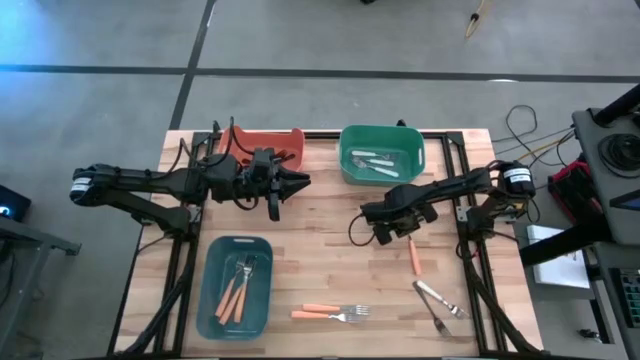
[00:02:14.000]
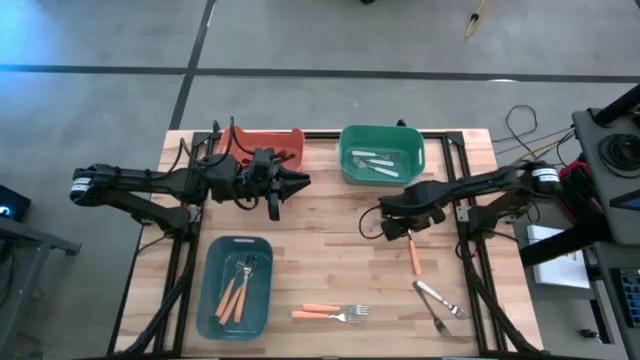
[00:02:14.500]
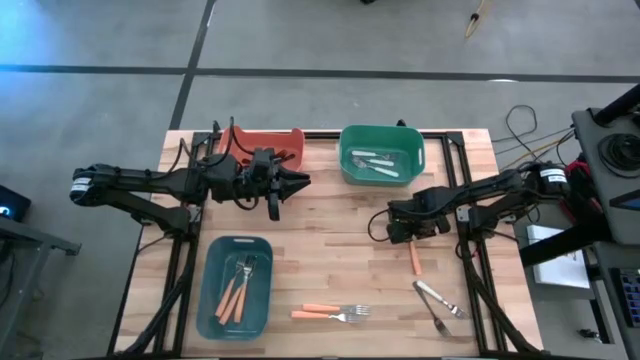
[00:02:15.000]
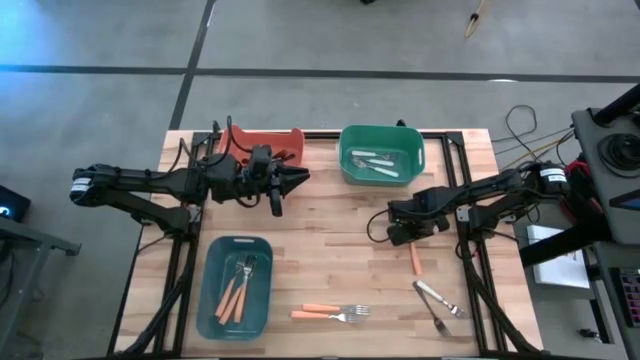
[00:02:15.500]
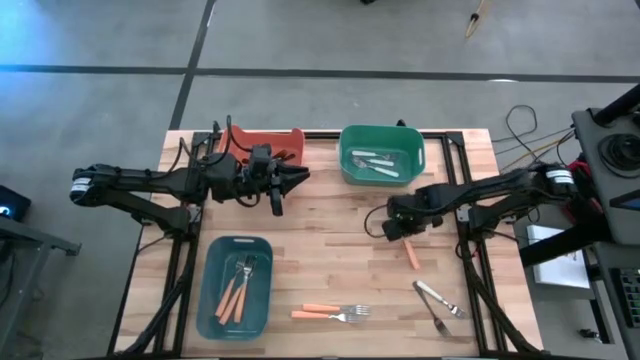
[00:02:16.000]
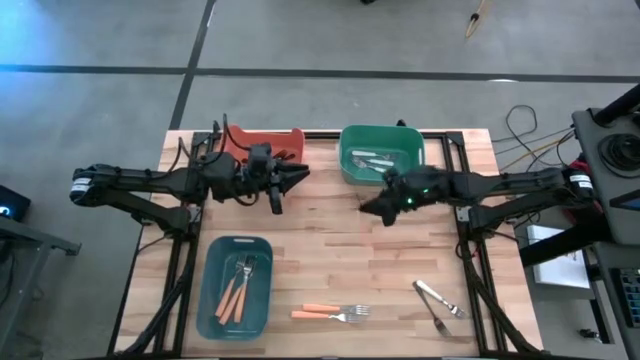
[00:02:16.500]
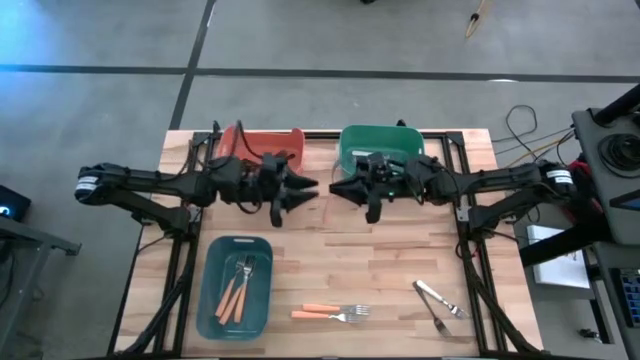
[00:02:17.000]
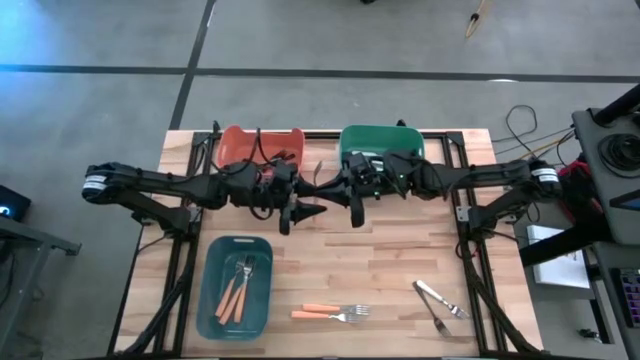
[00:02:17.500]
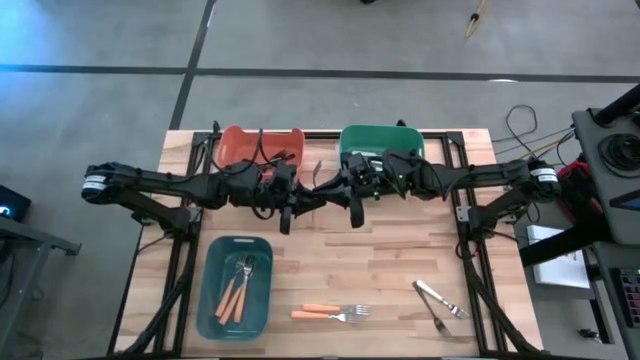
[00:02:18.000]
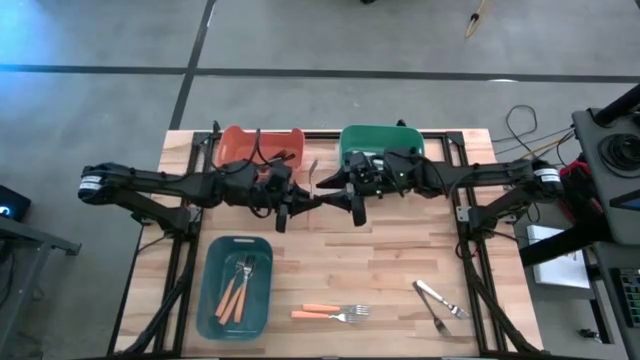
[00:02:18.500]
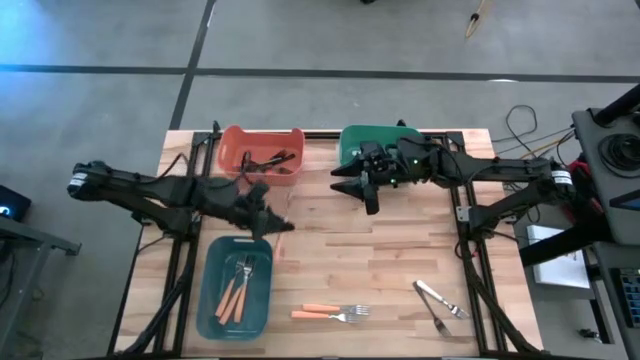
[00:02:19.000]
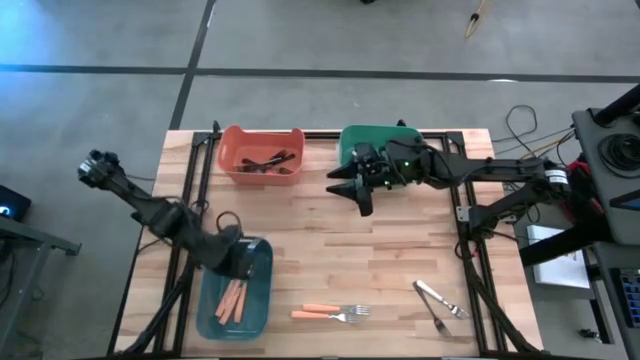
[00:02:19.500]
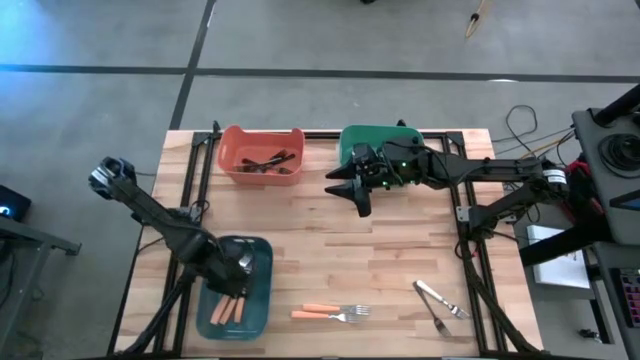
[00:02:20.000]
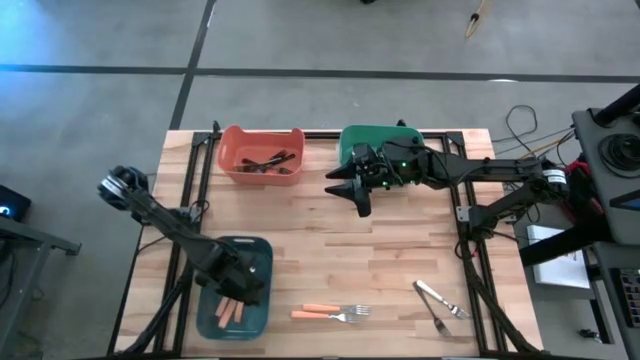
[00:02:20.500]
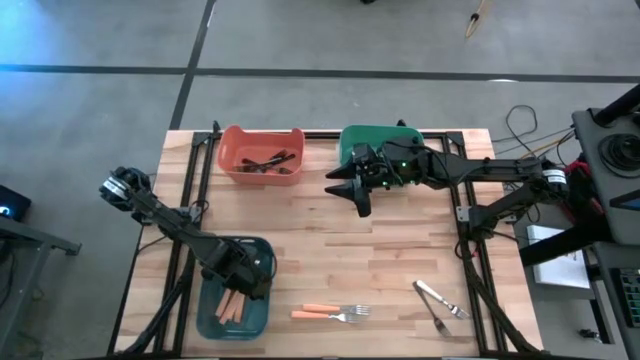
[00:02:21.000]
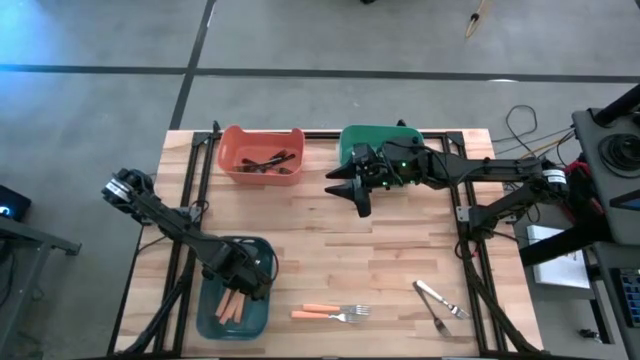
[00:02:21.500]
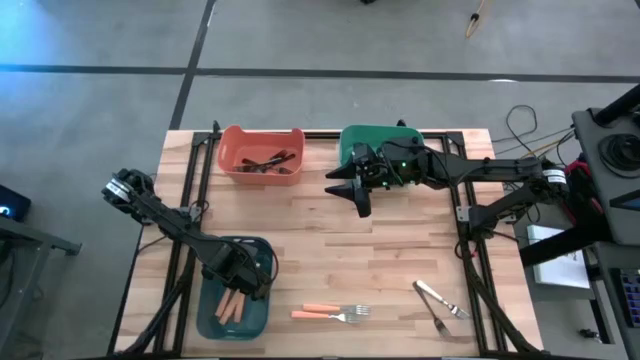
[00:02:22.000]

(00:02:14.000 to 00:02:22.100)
Task: Sort silverware by color (type)
Put the orange fork into the blue-green bin

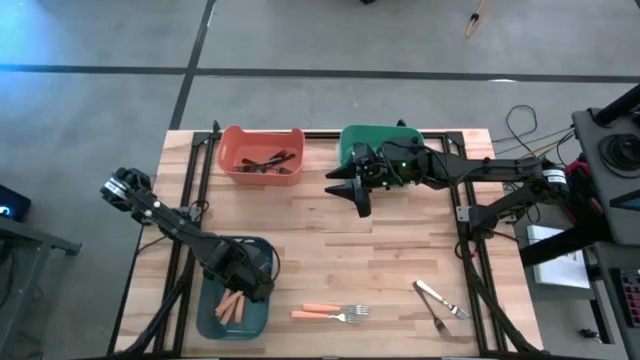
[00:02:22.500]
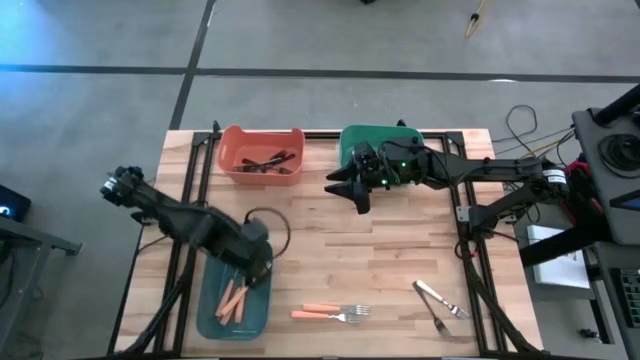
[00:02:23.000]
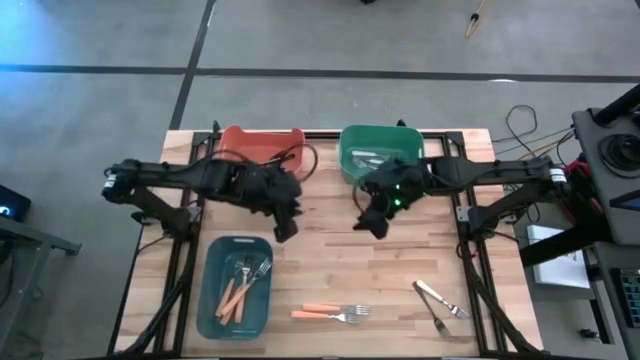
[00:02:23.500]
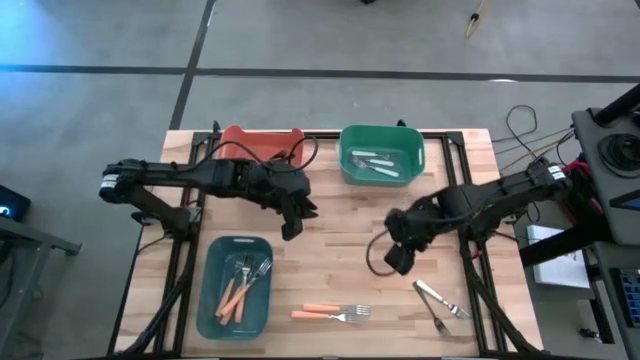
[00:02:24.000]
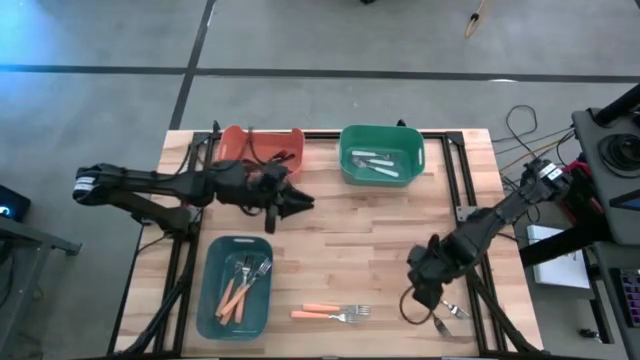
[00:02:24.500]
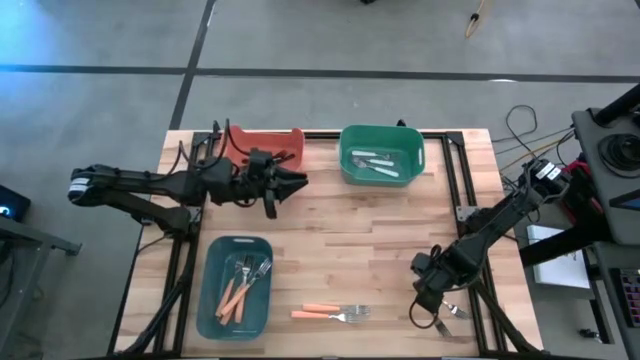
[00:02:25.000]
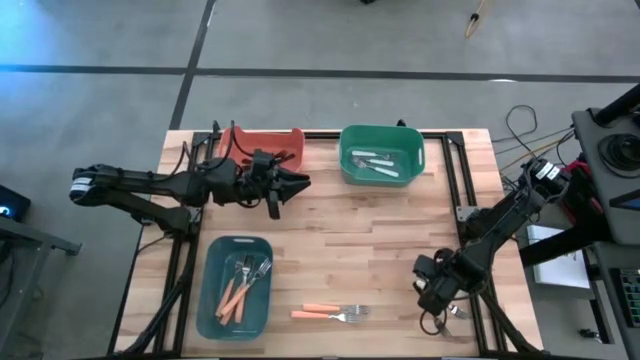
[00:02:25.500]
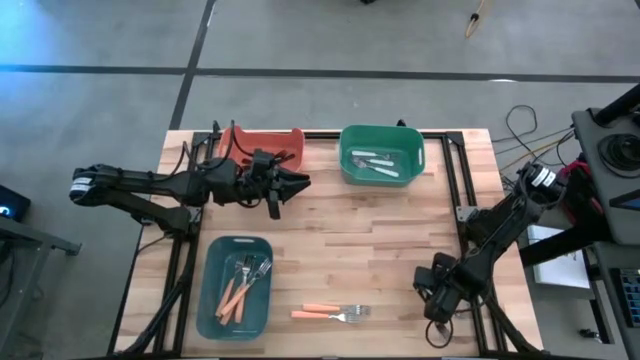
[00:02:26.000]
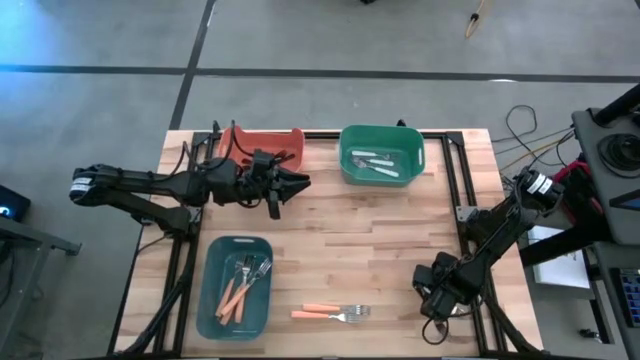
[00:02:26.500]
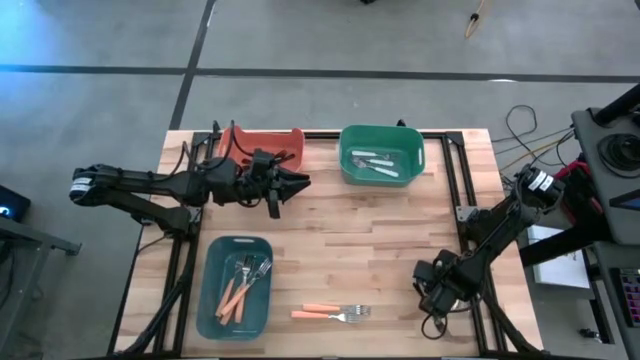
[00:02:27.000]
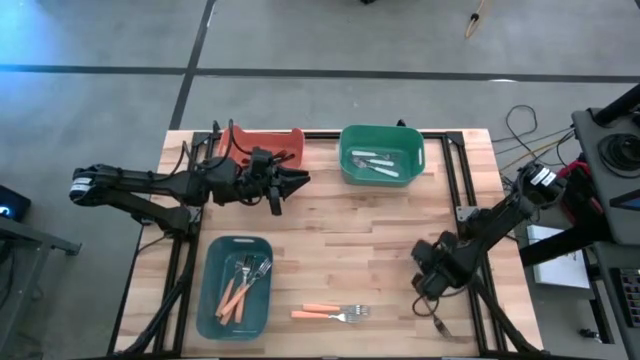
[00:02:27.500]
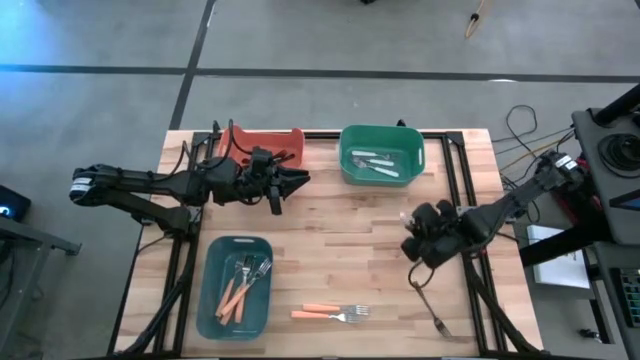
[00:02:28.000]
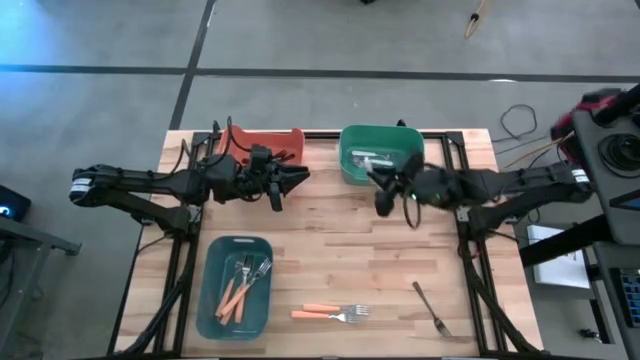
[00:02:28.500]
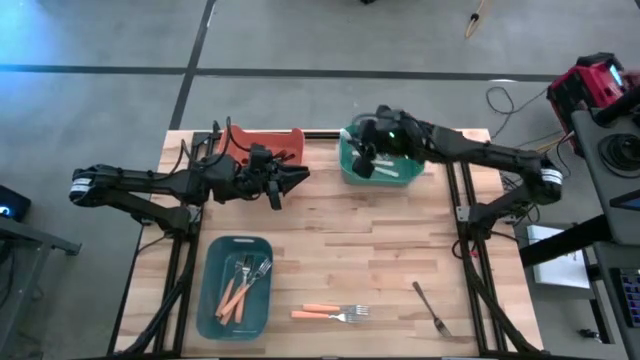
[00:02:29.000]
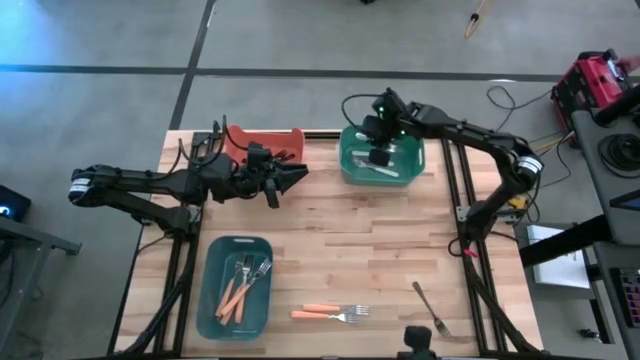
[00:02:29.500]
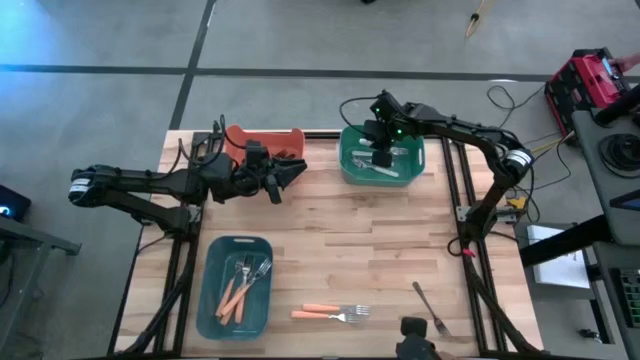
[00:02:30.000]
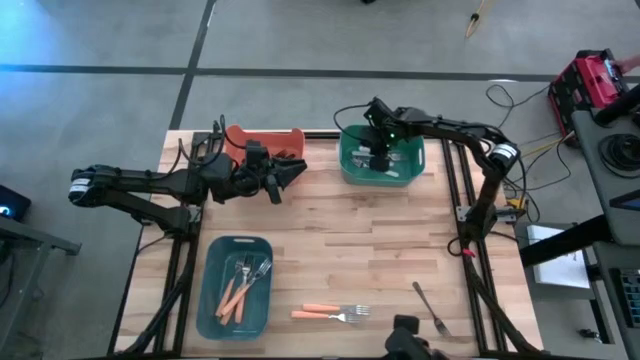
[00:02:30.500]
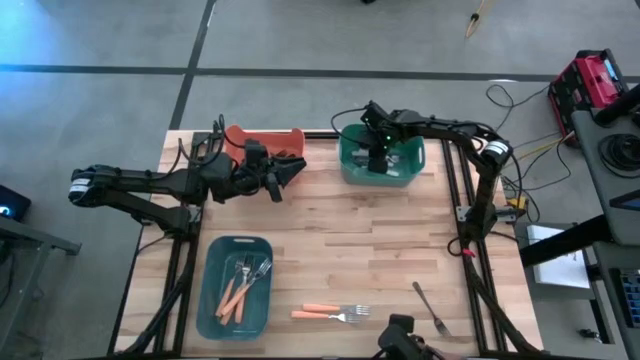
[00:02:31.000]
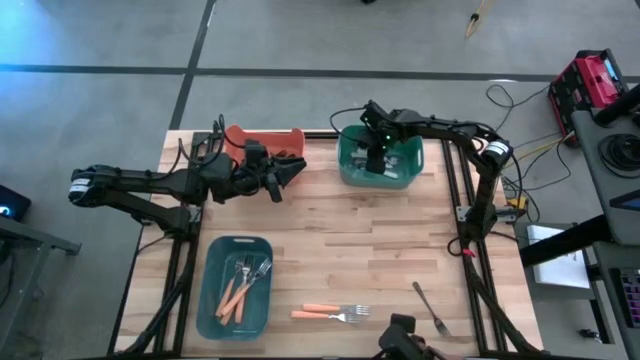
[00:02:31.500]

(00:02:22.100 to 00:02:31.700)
Put the white fork into the green bin
